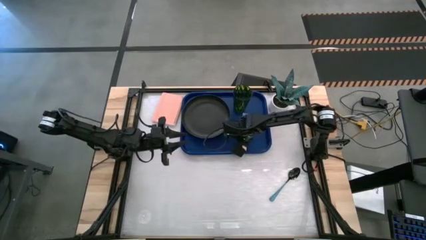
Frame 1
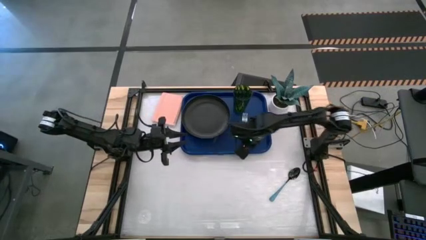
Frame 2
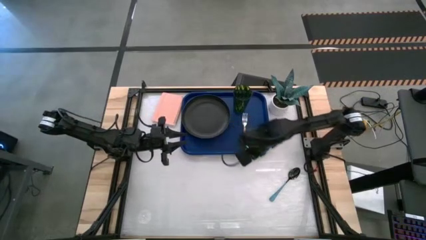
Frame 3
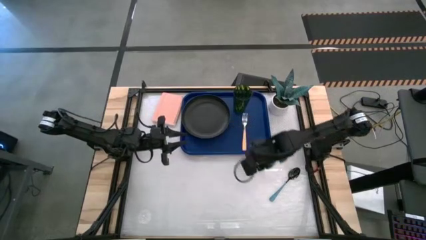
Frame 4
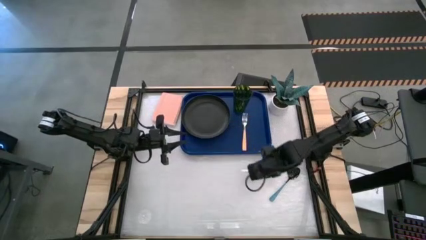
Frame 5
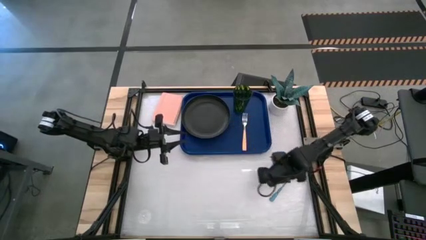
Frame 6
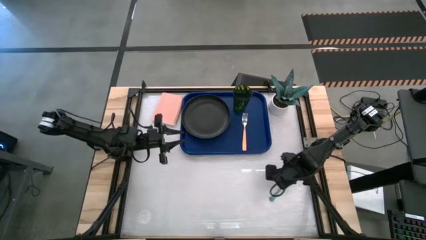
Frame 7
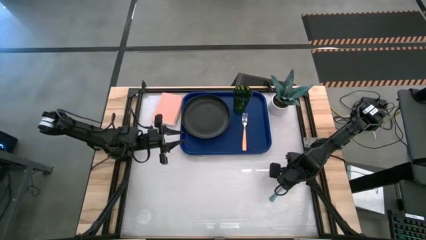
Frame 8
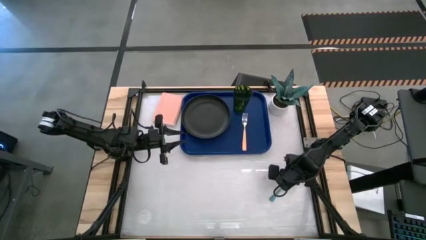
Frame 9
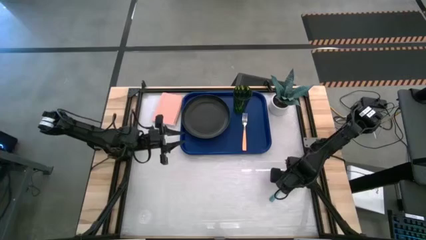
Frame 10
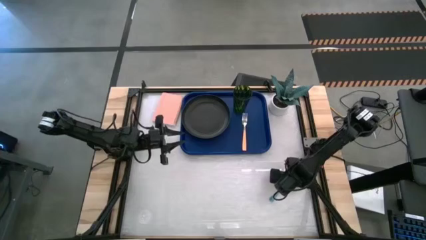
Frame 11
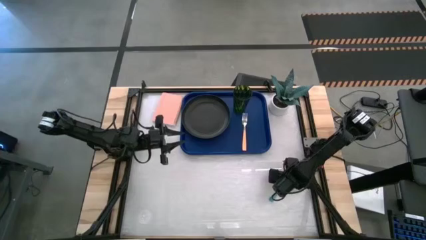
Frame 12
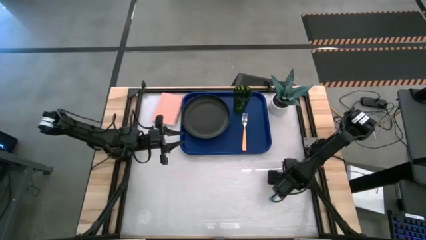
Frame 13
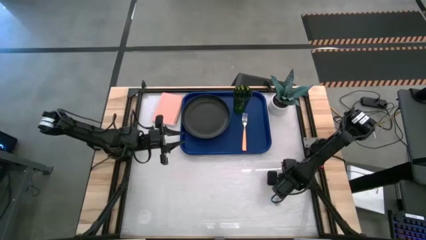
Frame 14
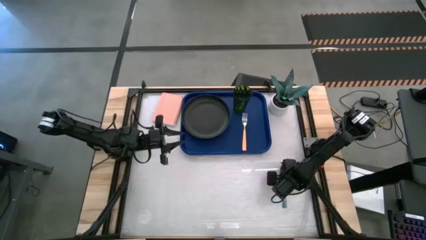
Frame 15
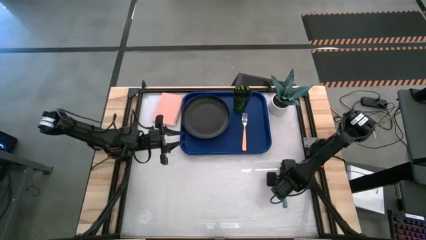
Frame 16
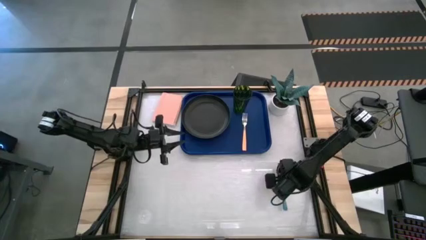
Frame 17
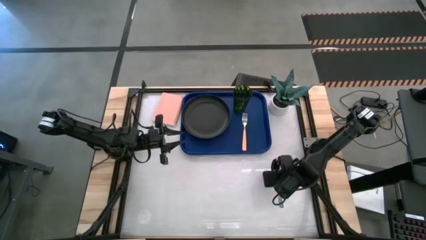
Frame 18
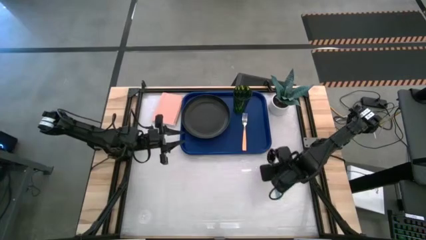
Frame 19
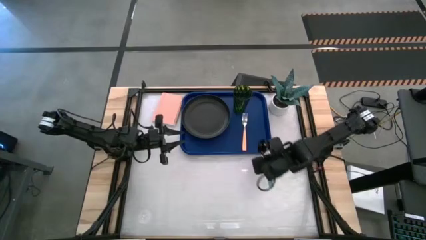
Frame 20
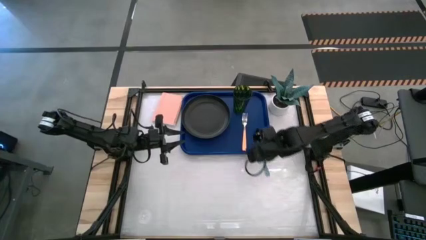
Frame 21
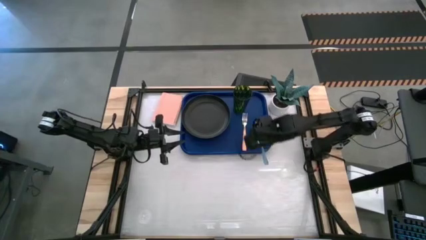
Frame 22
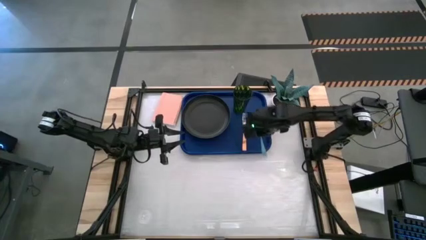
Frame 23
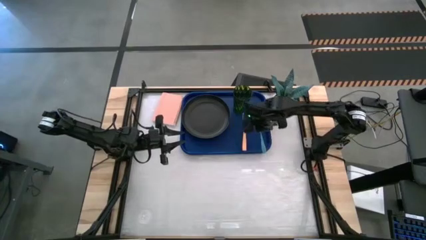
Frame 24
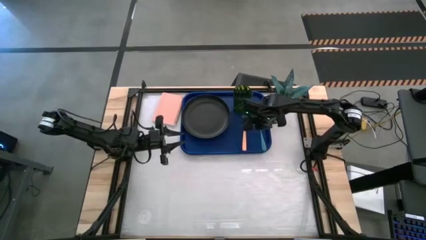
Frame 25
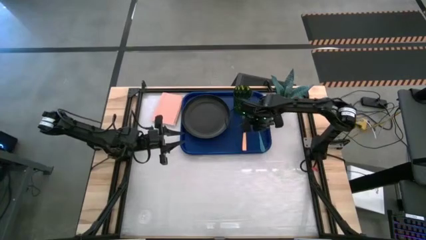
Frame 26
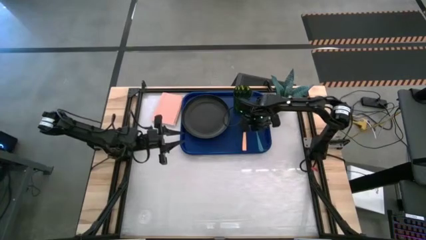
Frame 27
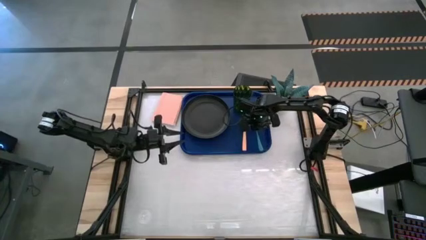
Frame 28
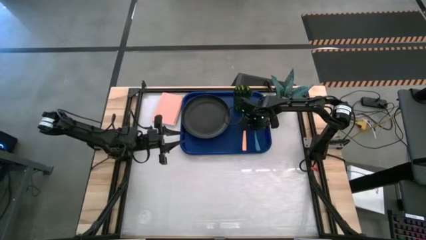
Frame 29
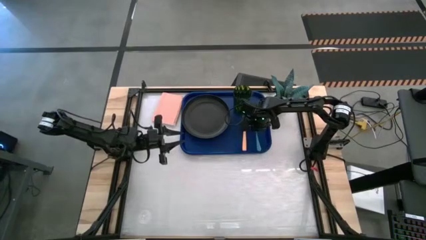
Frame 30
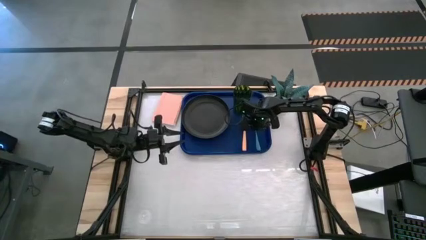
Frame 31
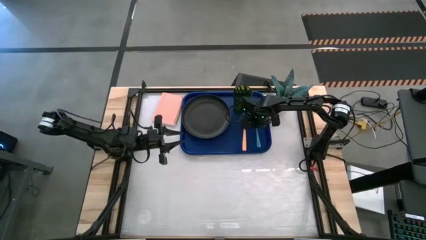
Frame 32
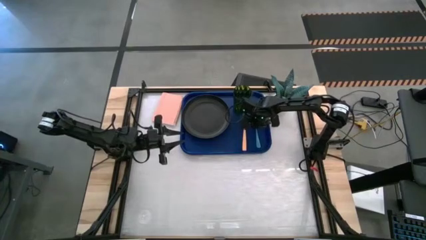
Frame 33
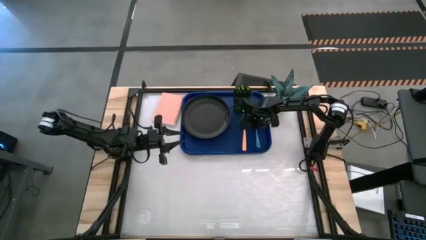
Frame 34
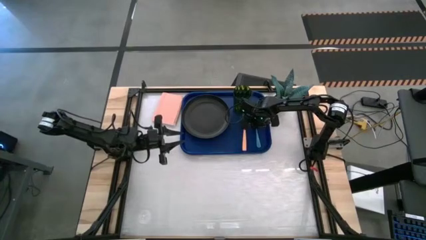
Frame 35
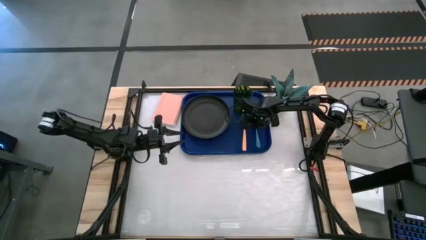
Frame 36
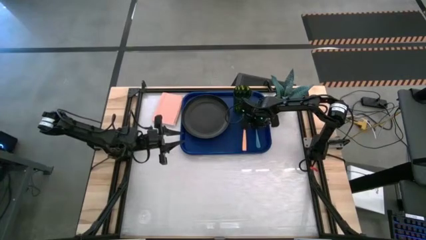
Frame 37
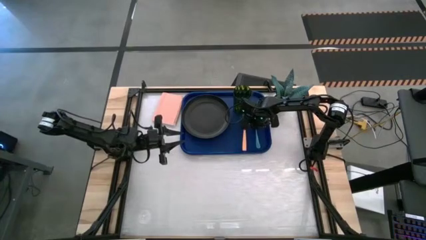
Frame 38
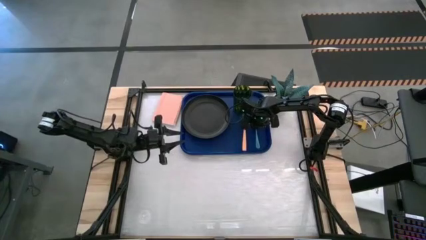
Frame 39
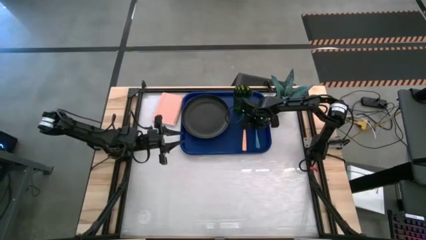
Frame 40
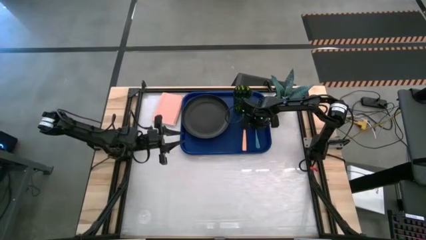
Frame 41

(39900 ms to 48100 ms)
Task: Pick and place plate/cup/fork/spoon on tray
Put the blue spoon on the blue tray to the right of the orange fork

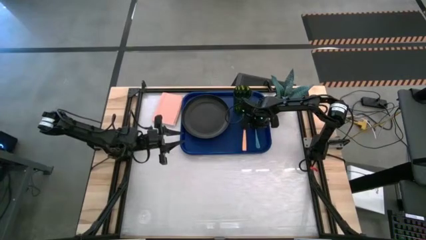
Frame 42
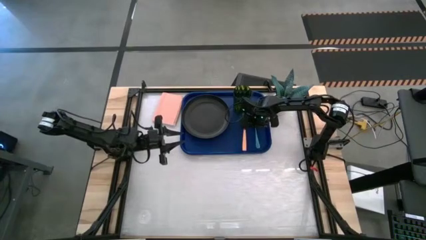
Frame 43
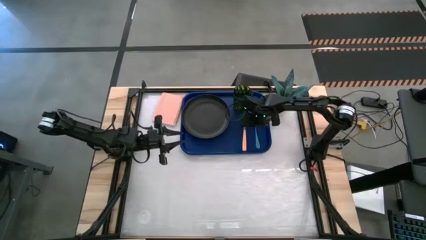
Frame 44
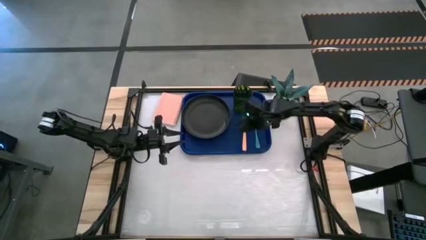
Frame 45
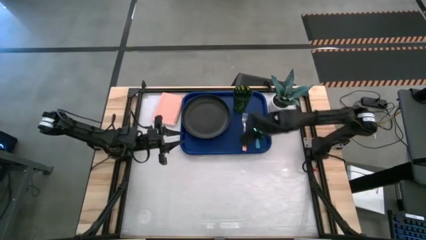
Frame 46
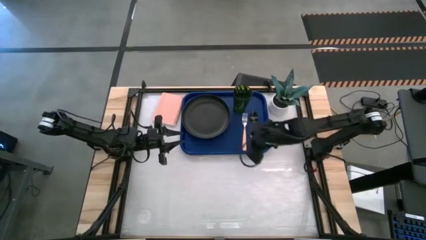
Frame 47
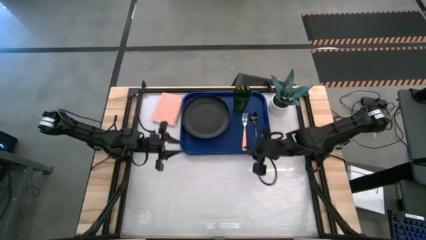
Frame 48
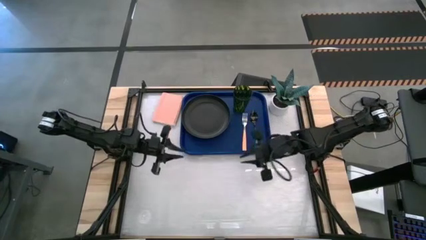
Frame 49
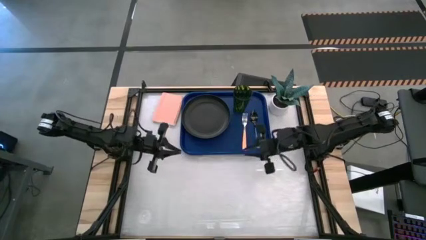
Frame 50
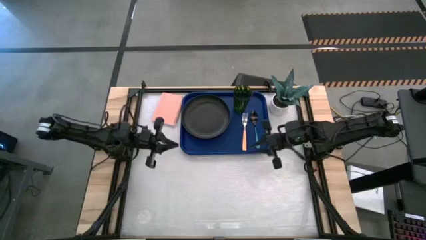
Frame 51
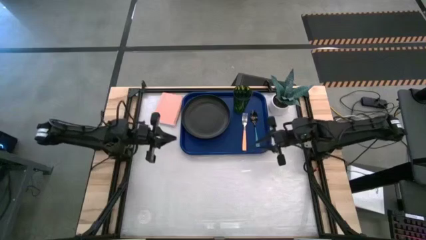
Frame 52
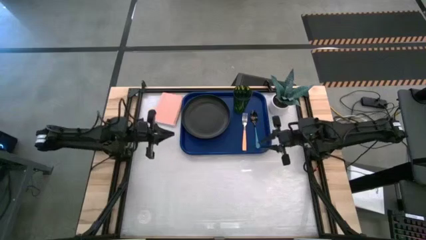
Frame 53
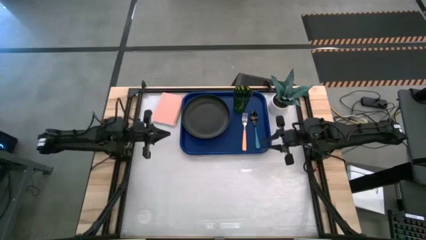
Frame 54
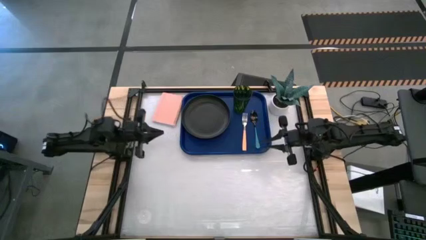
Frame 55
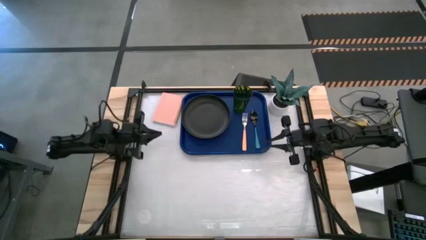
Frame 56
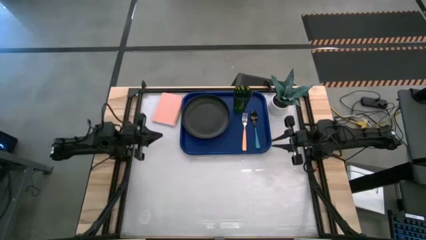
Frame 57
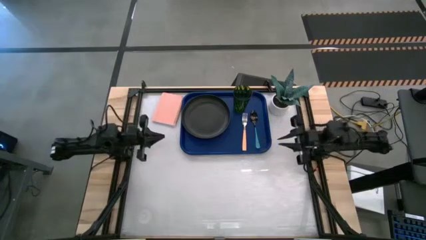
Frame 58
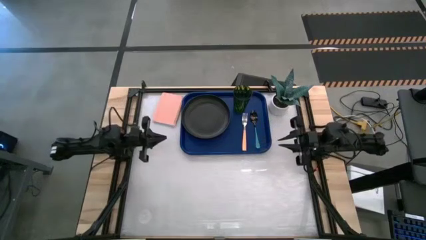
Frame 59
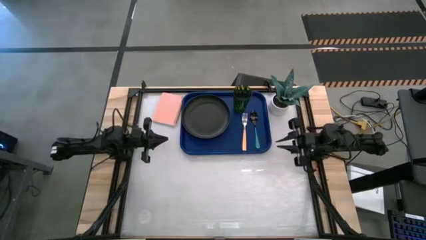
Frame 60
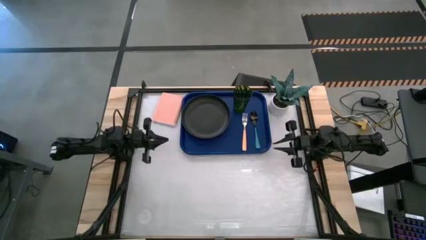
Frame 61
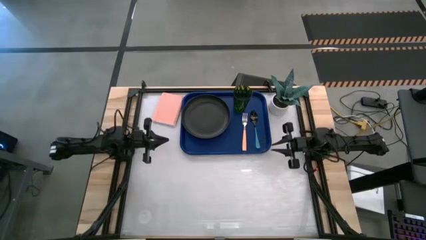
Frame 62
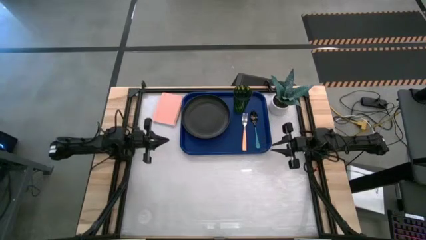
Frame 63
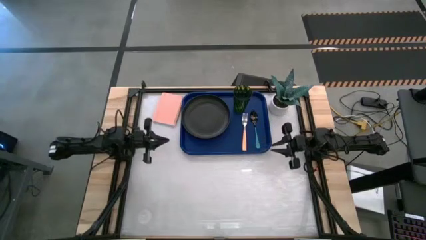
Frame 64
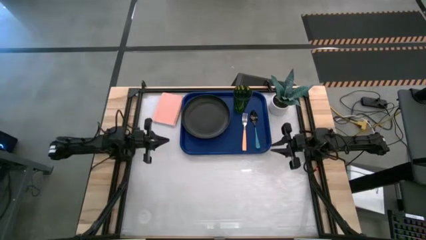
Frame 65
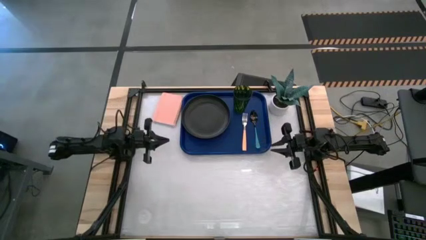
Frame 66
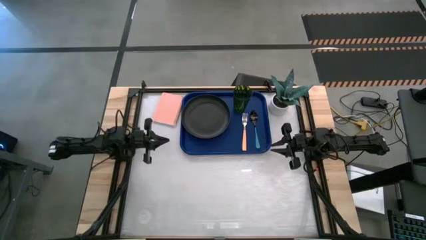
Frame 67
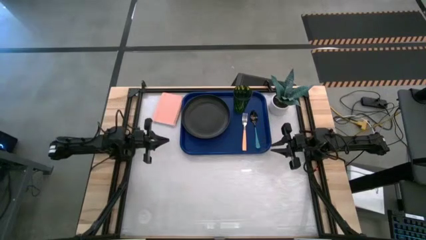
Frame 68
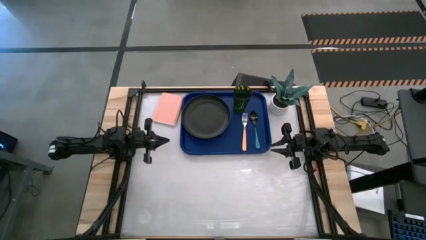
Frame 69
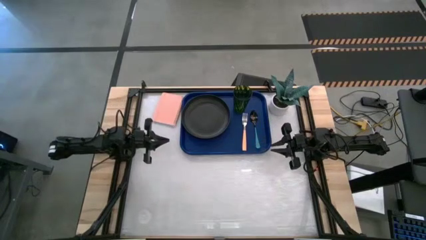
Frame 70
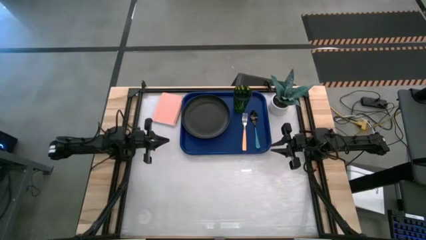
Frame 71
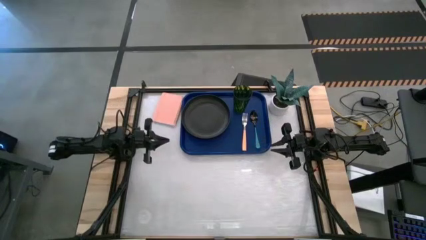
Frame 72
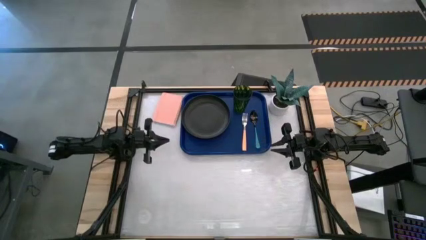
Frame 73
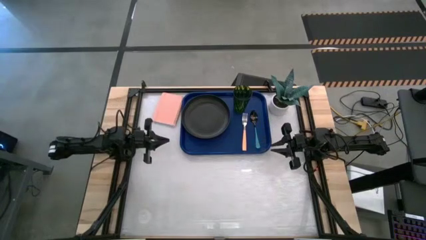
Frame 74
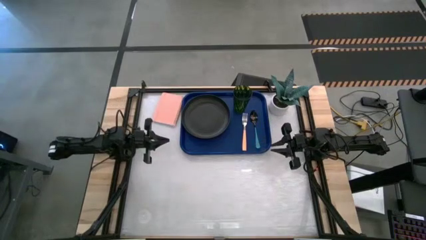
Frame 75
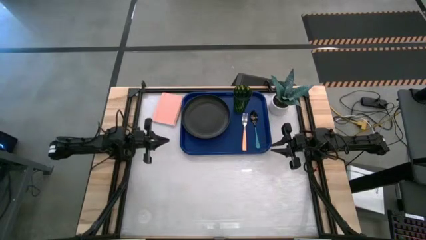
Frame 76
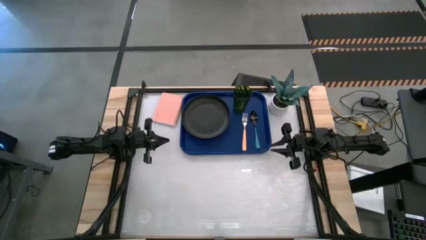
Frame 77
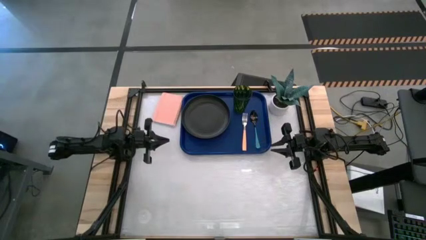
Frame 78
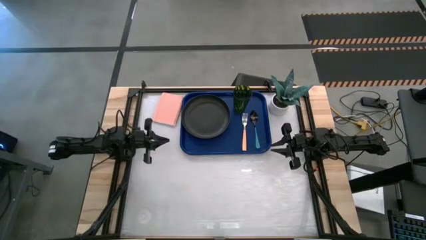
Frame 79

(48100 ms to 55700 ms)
Return to Home Position
